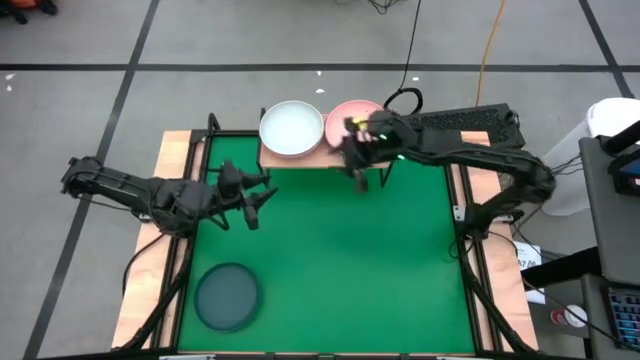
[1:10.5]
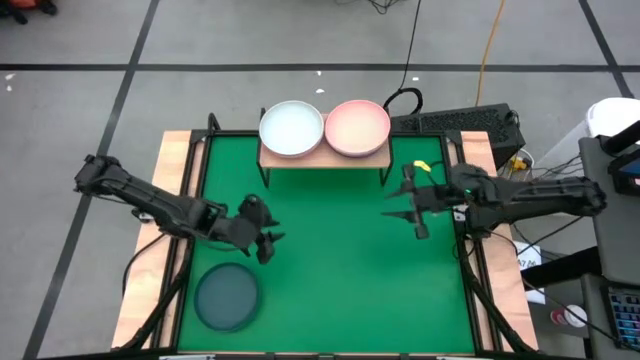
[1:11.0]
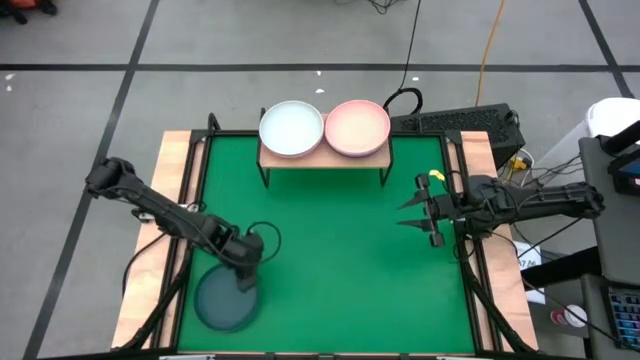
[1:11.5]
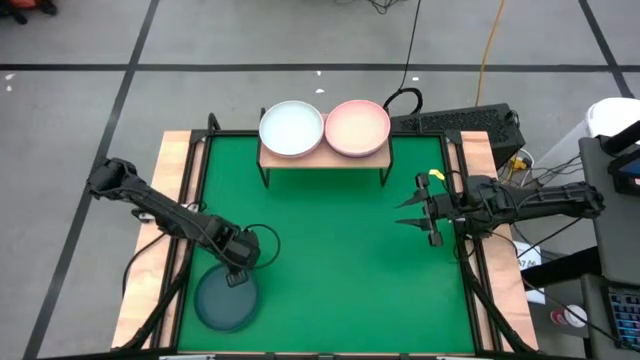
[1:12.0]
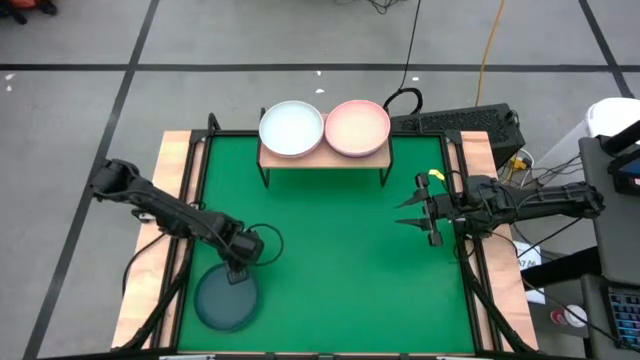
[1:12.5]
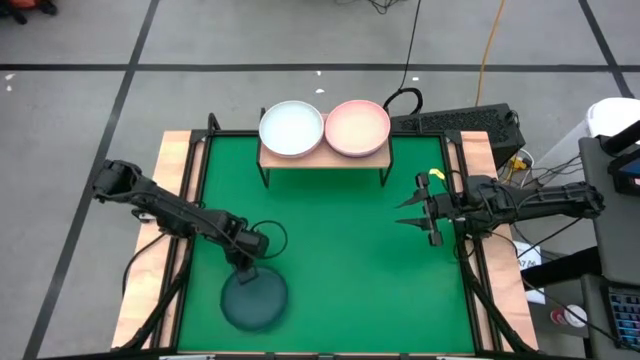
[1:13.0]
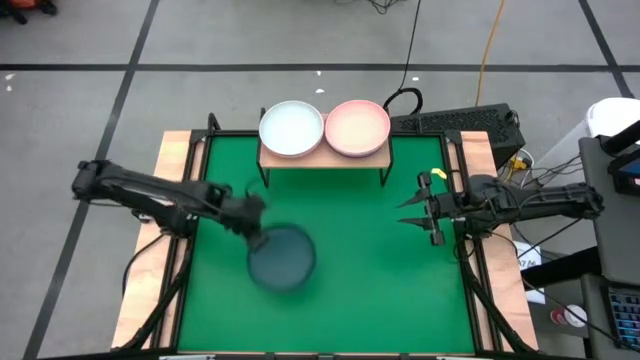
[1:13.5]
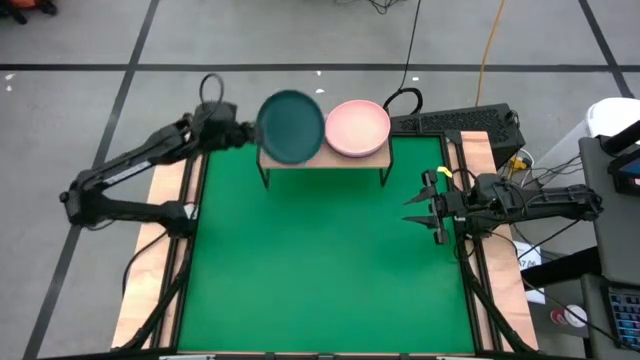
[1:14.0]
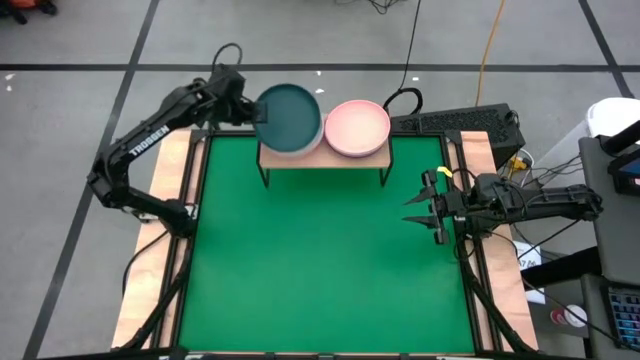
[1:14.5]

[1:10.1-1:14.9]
Task: Place and stack plates onto a shelf
Stack the dark blue plate on top of white plate on the shelf

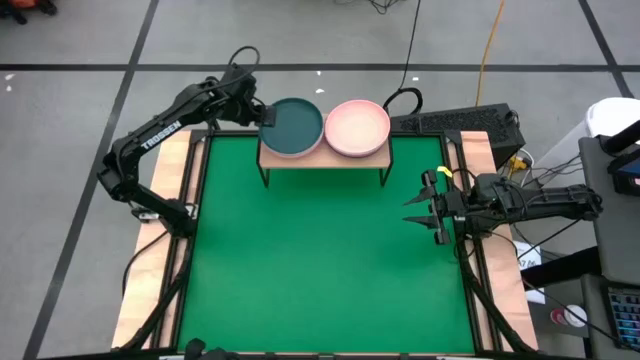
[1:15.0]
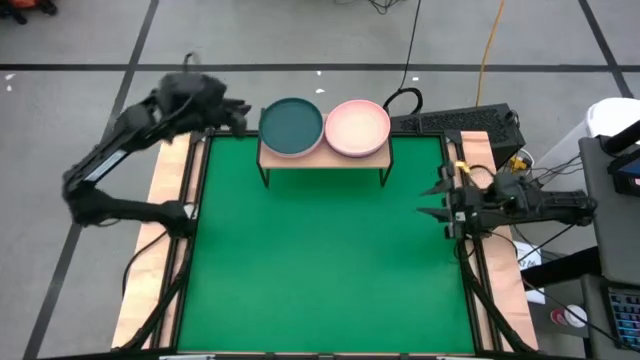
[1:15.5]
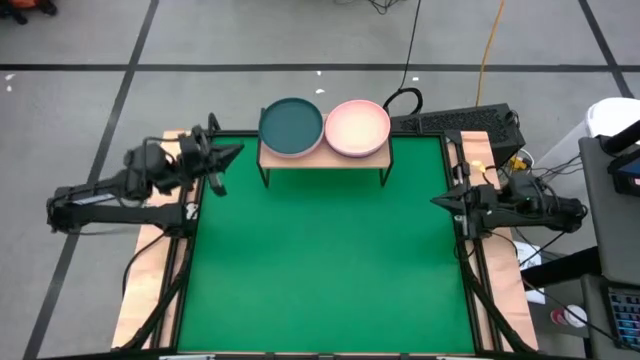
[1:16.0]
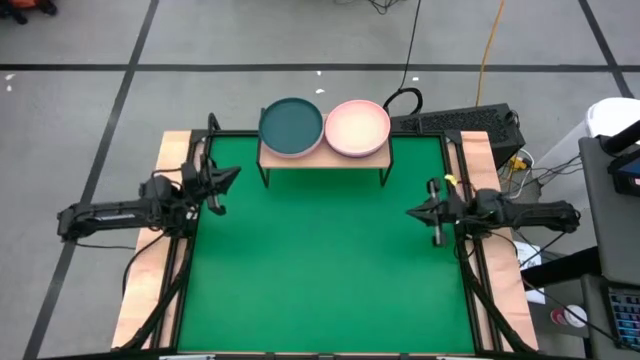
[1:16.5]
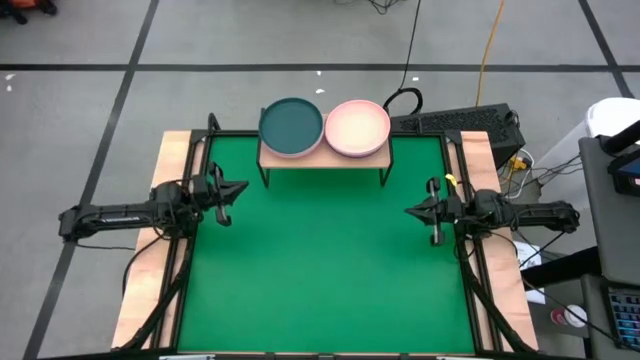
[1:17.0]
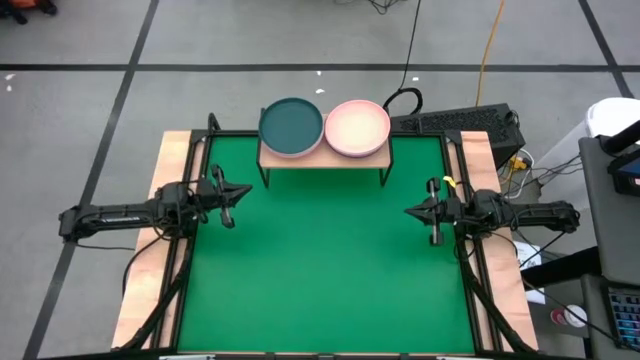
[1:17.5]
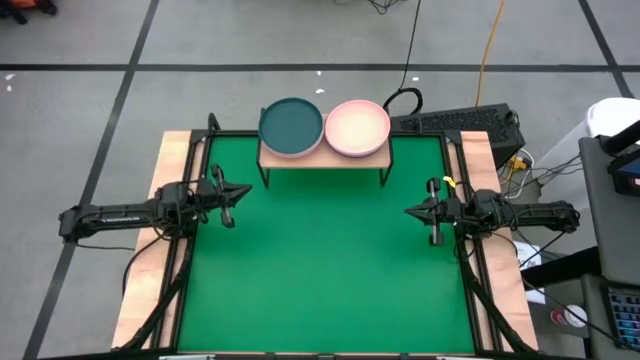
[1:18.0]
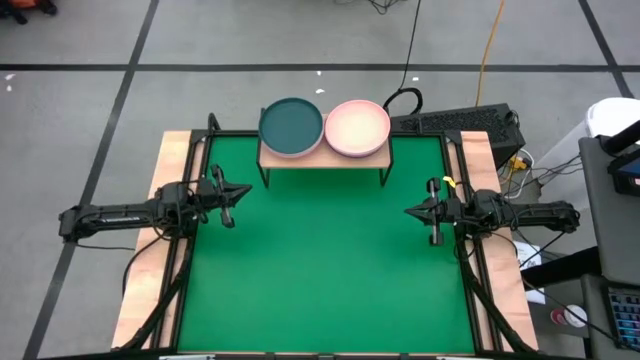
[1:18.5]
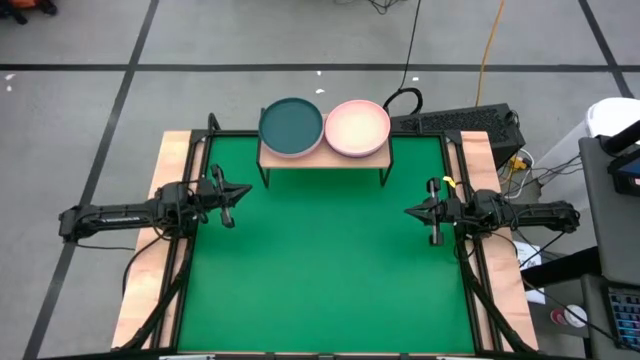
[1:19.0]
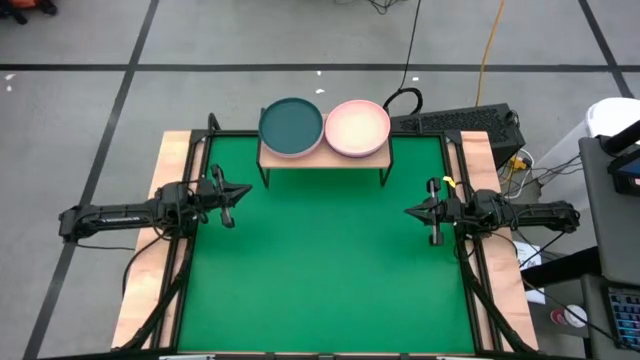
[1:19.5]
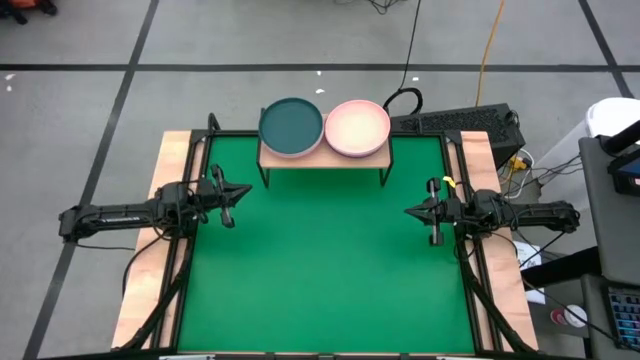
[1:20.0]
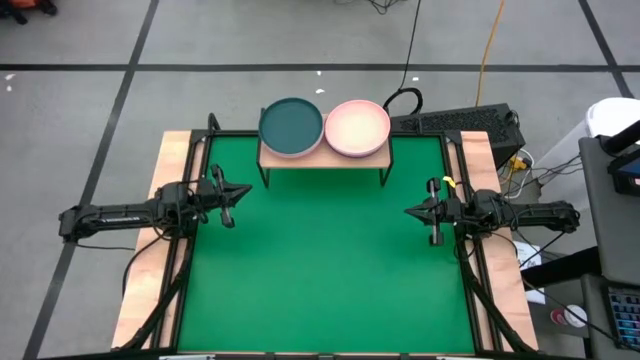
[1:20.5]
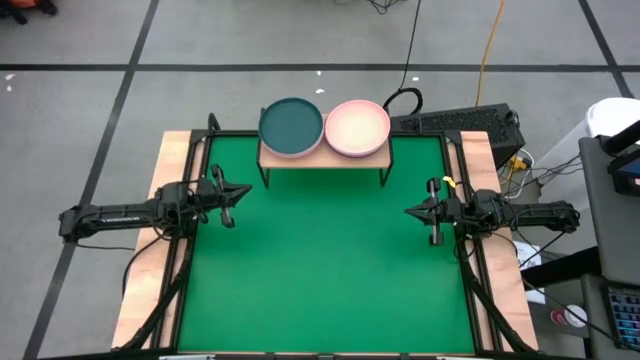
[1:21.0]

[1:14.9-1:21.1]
Return to Home Position

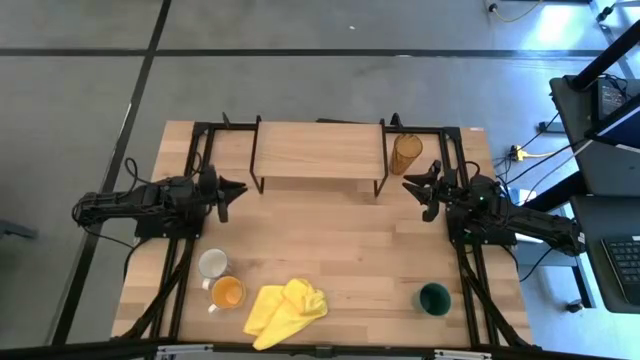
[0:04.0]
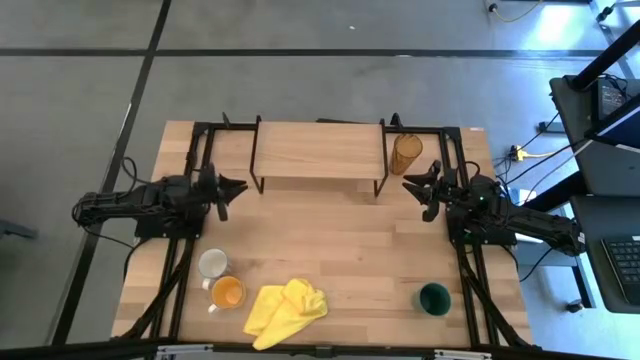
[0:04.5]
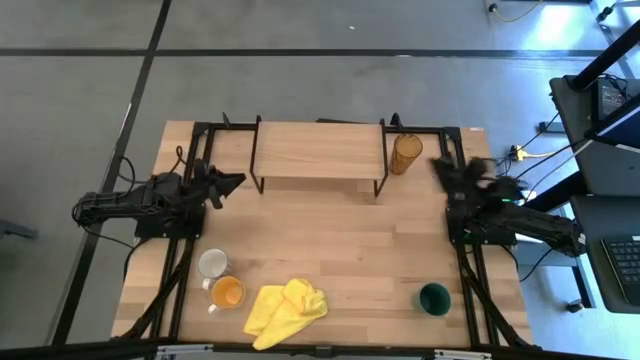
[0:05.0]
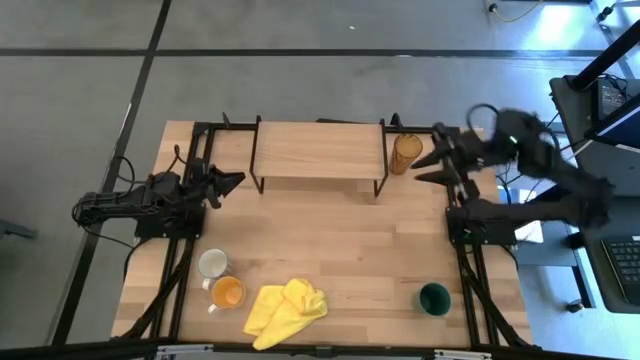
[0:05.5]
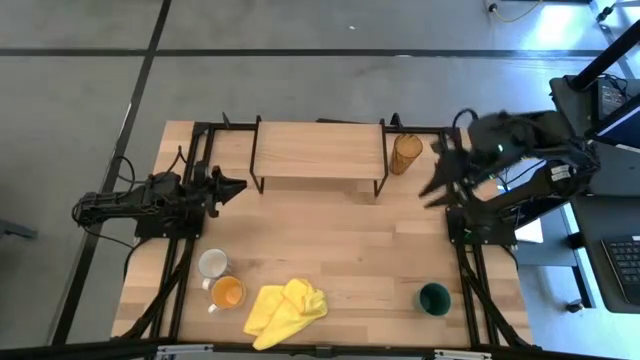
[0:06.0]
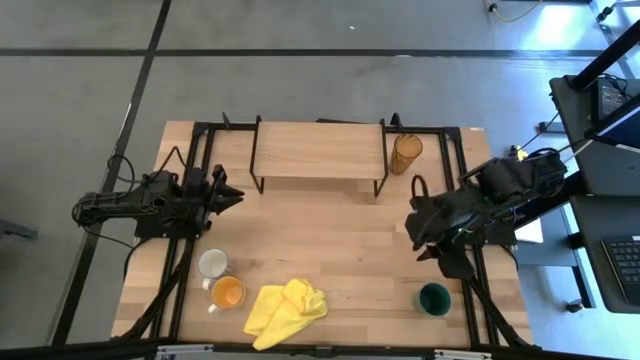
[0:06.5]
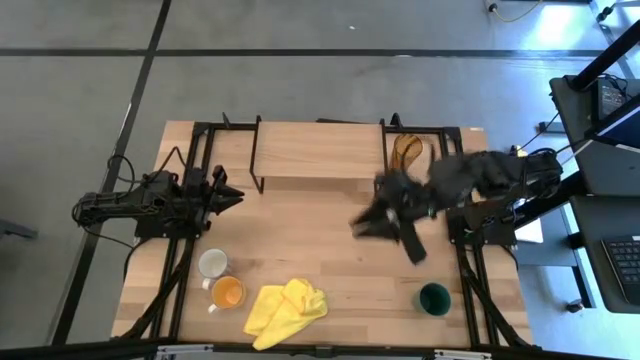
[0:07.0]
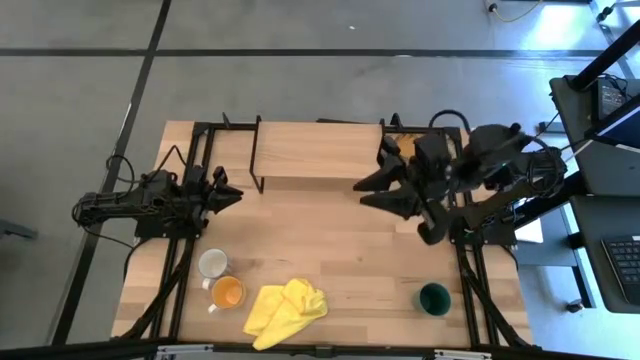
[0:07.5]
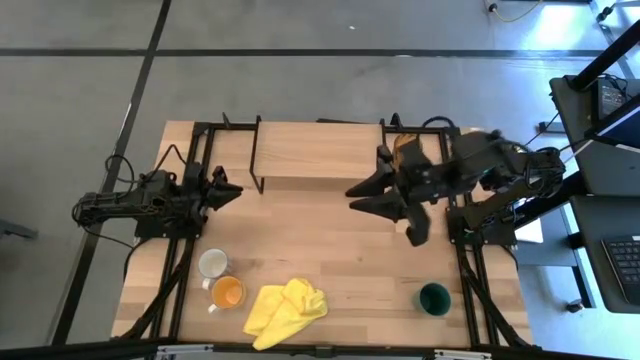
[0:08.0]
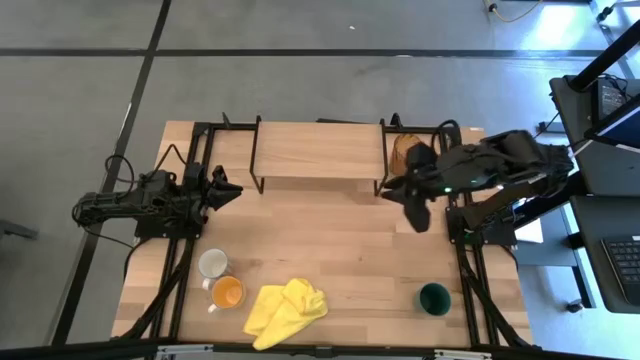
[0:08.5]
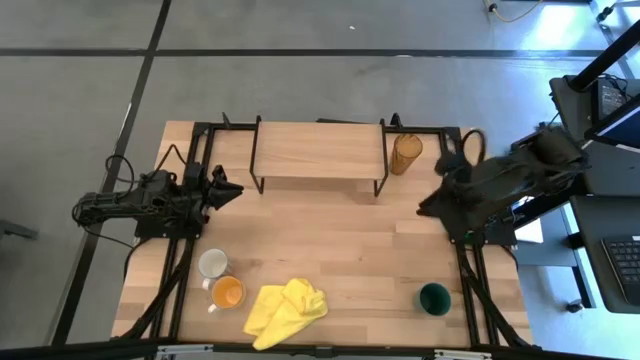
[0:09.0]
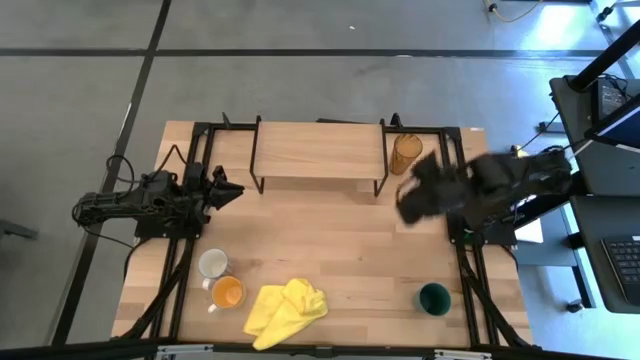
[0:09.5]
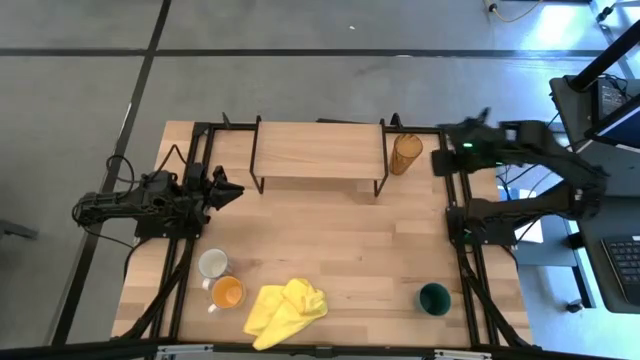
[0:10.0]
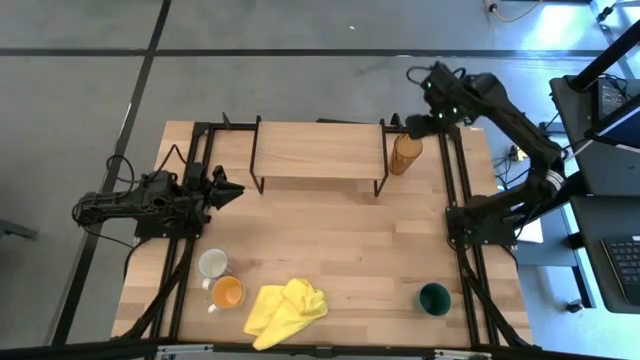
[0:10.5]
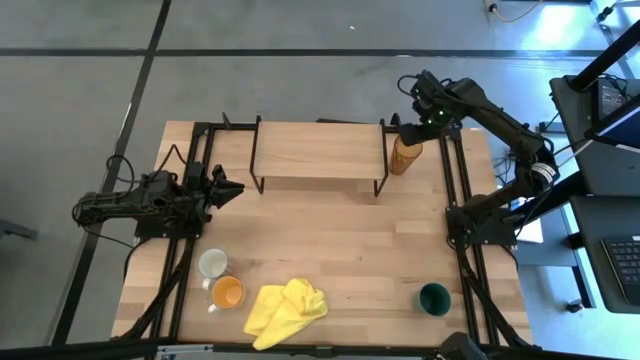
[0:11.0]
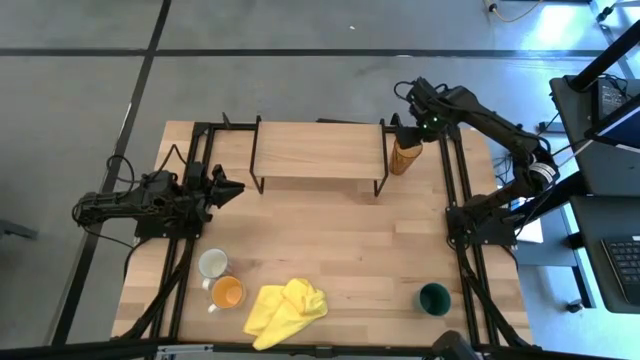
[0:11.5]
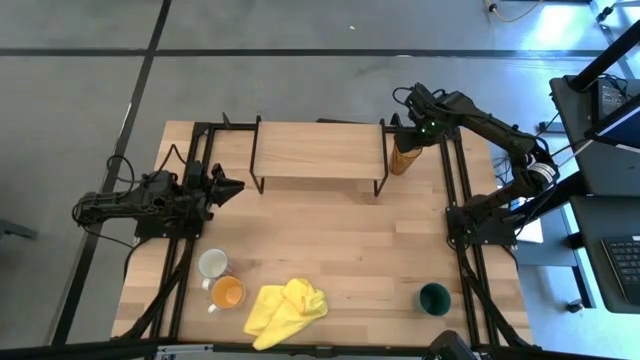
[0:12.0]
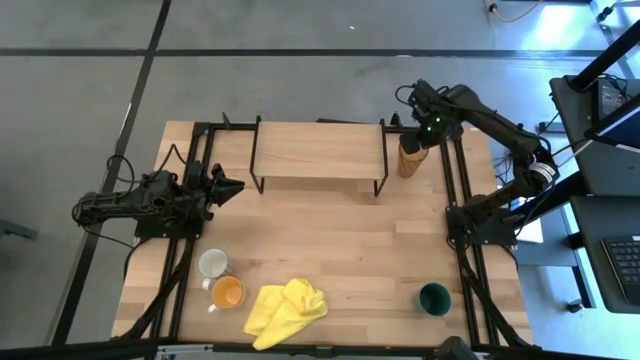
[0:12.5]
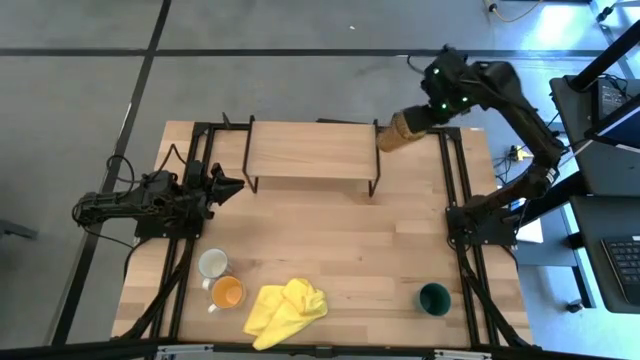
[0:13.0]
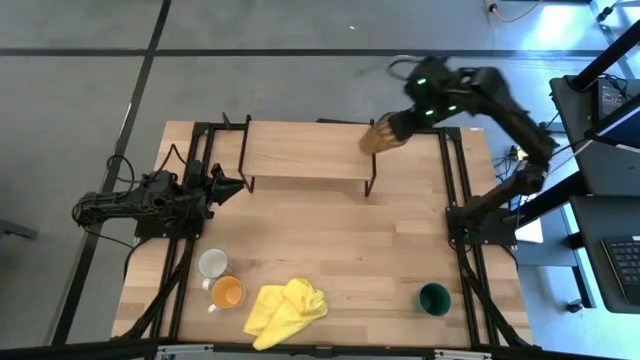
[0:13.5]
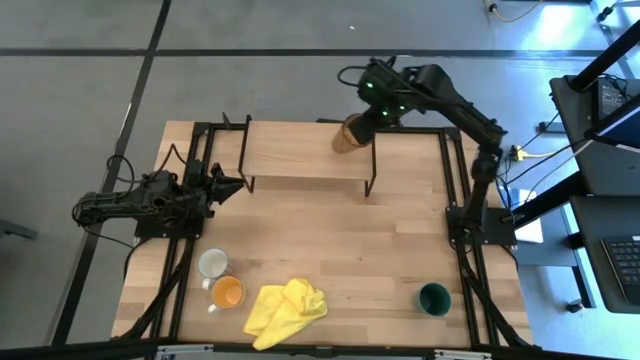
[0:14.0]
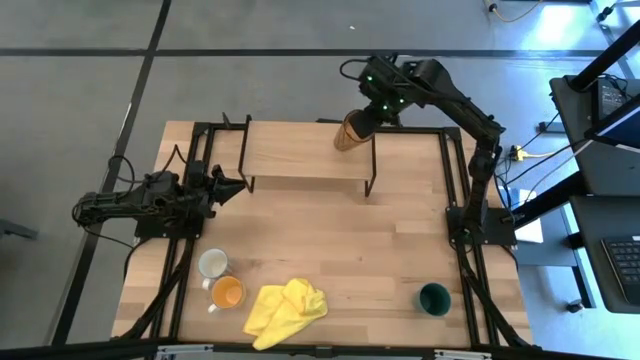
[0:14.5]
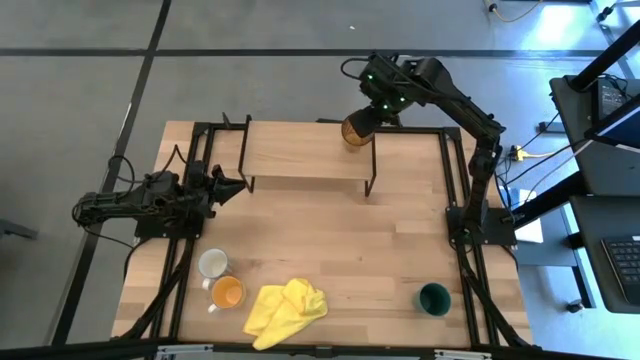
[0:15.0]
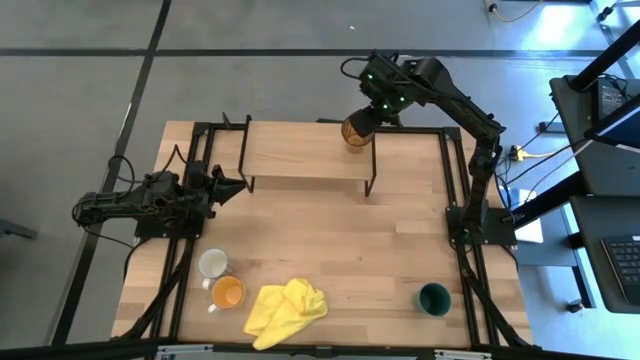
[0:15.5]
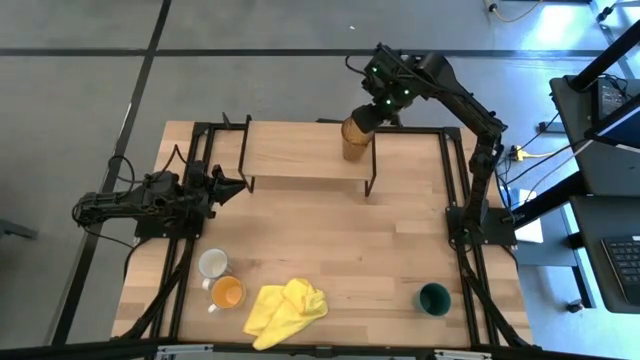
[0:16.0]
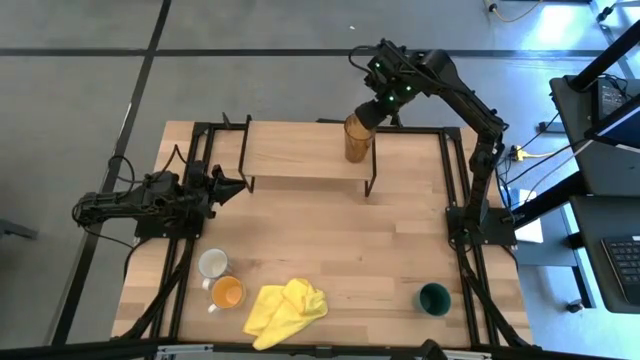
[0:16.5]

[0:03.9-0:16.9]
Task: Stack small to large cups/mugs on shelf
Put the brown cup on the shelf
